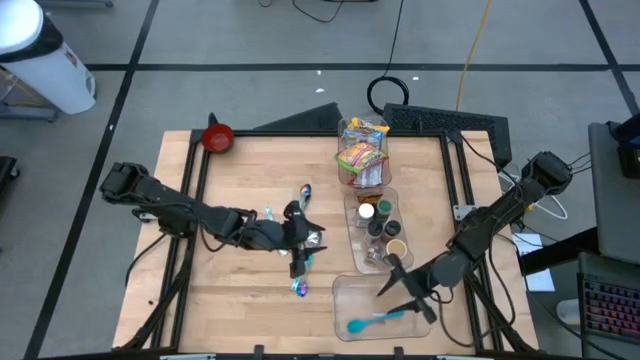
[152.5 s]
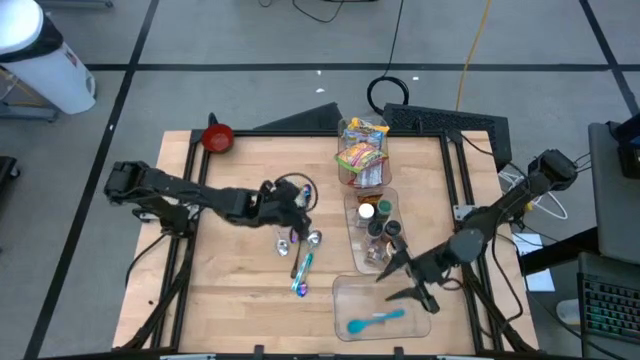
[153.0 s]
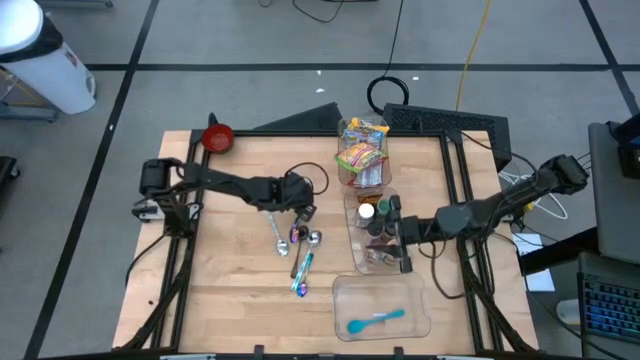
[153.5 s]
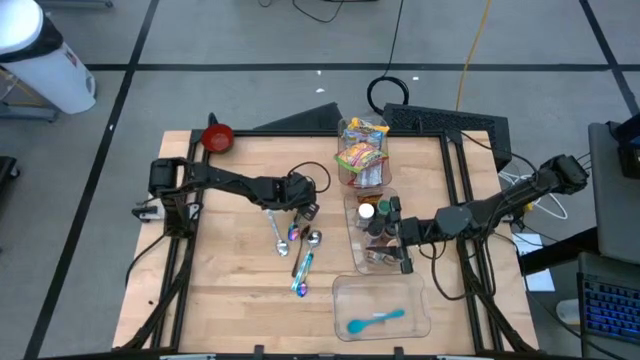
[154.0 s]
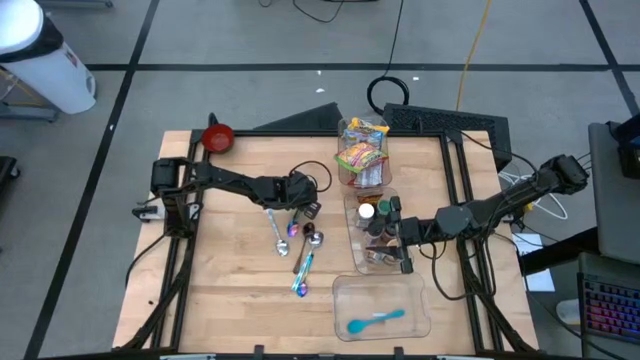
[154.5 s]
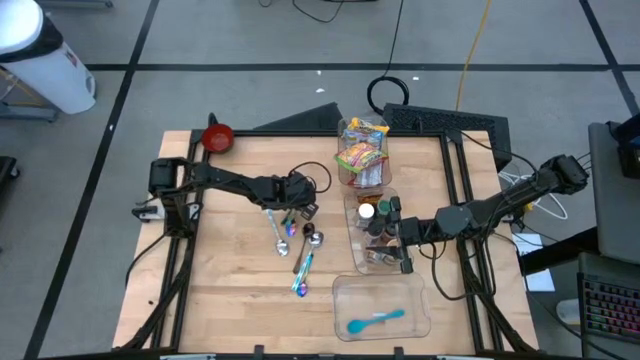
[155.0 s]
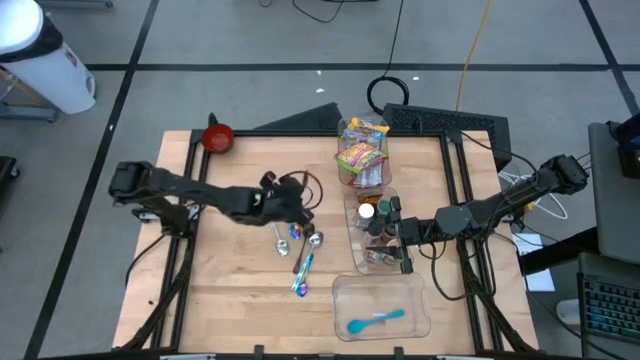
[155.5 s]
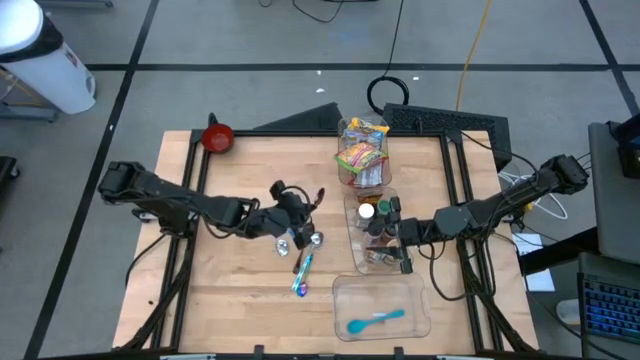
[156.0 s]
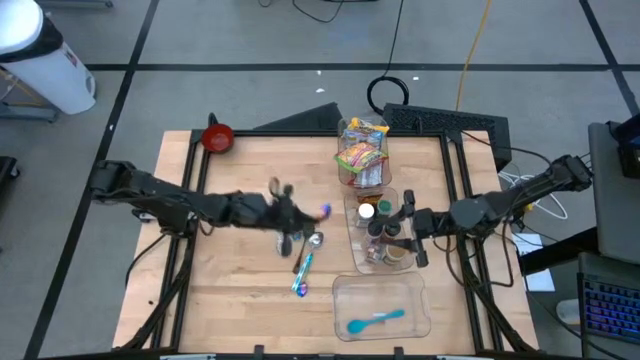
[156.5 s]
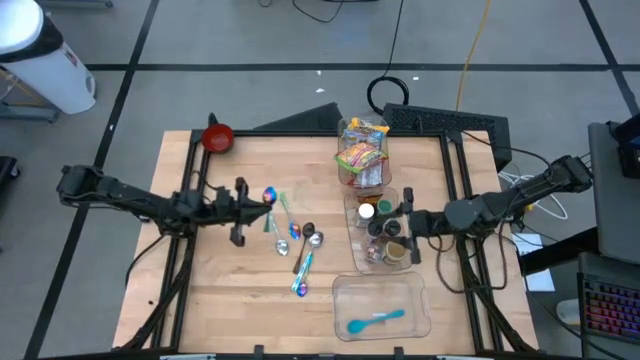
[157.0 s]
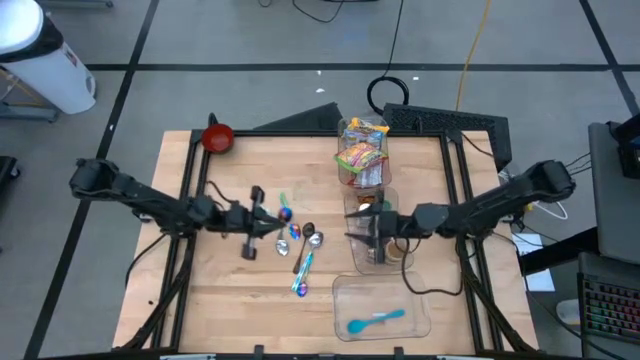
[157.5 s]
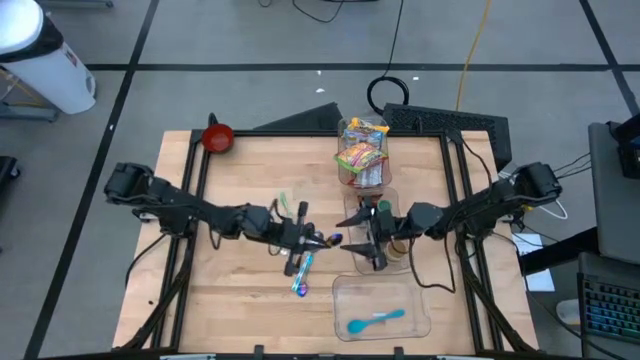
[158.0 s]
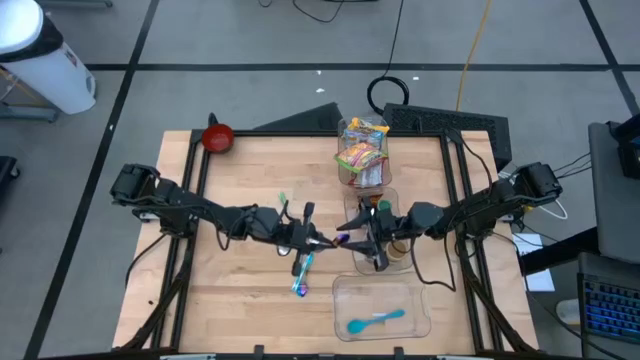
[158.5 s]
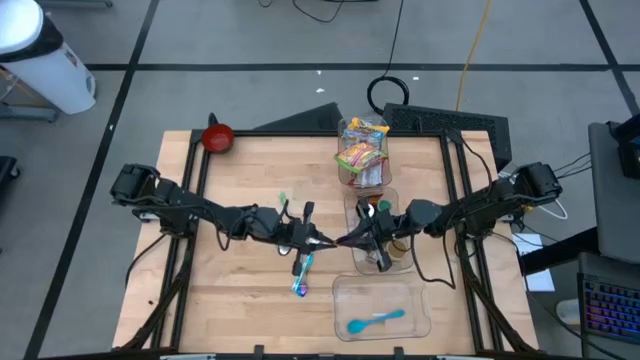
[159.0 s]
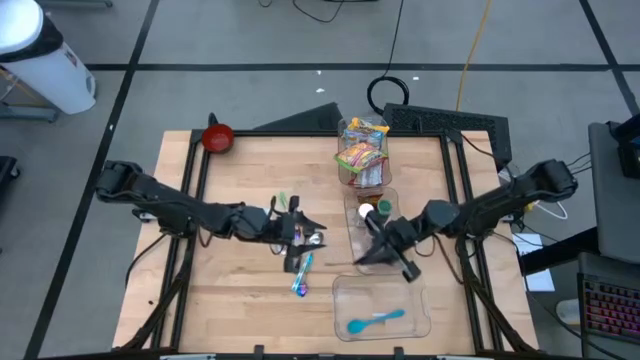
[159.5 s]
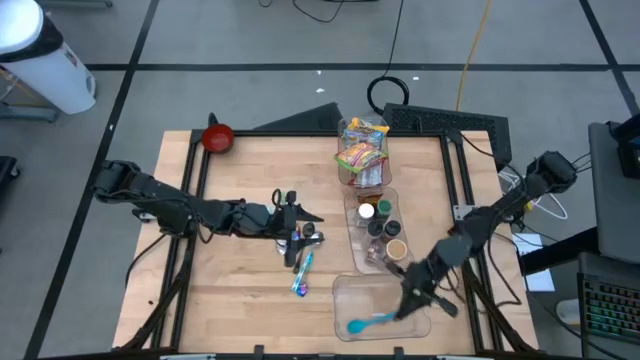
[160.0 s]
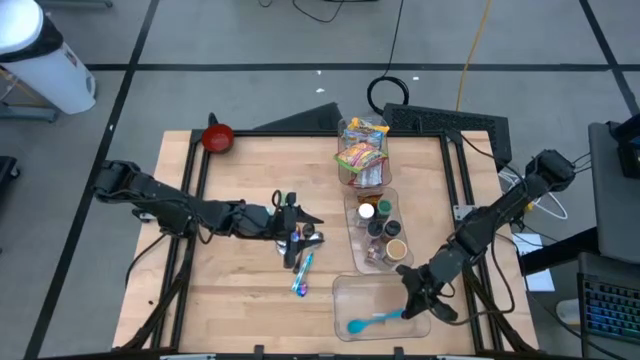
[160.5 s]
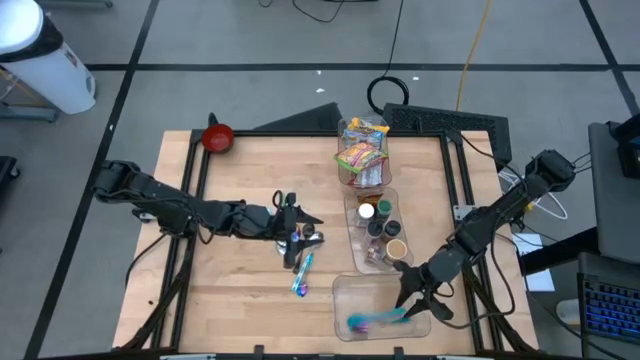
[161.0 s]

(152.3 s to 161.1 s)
Task: Pick & Place Food Item
Put the top left purple spoon into the bottom transparent bin

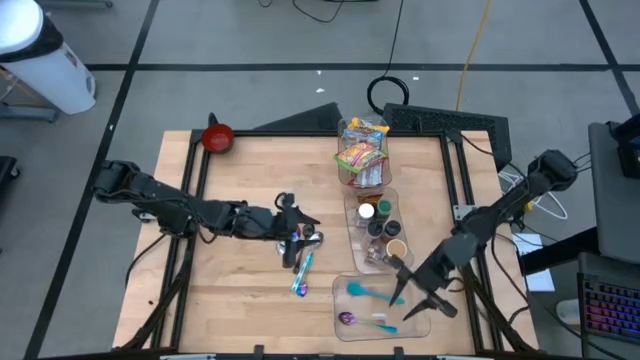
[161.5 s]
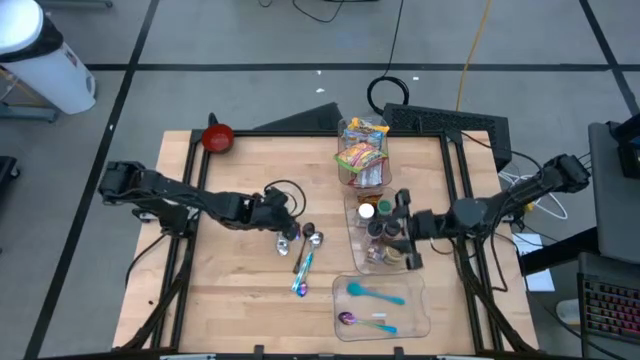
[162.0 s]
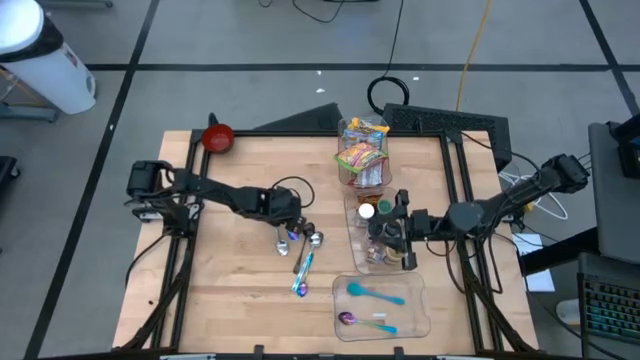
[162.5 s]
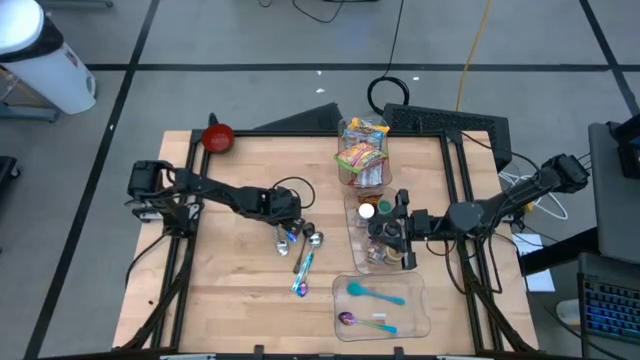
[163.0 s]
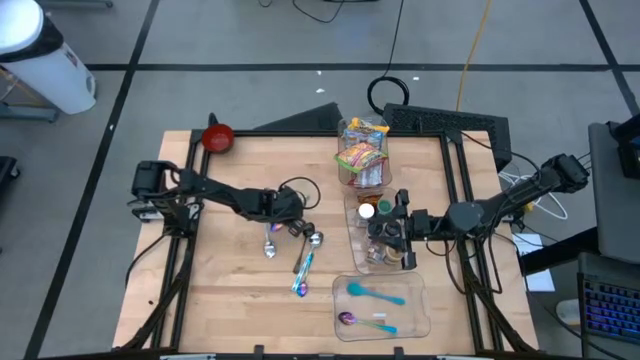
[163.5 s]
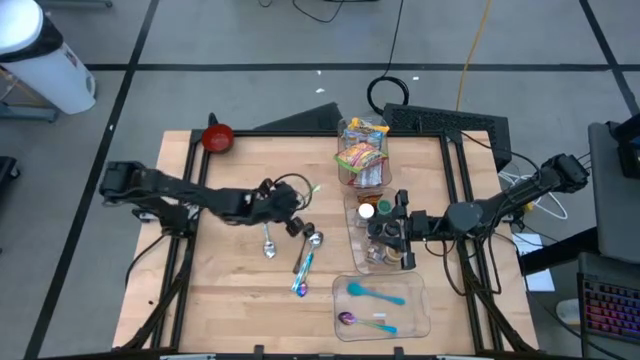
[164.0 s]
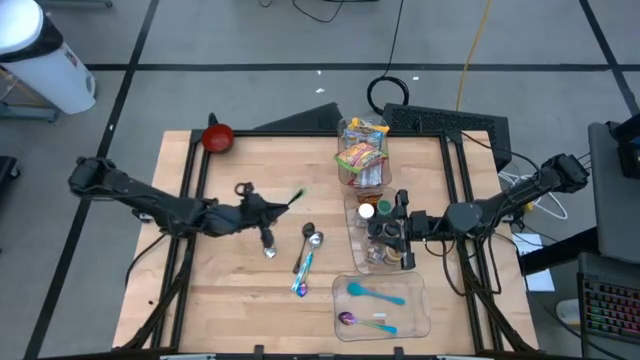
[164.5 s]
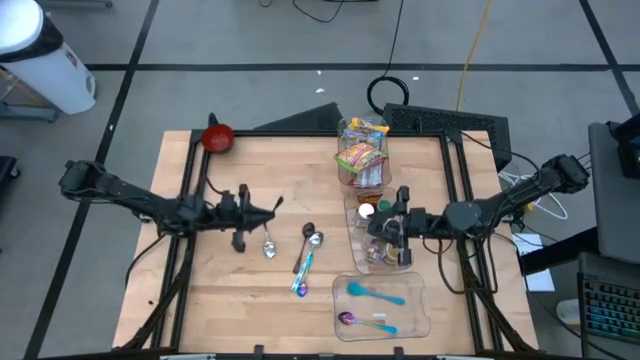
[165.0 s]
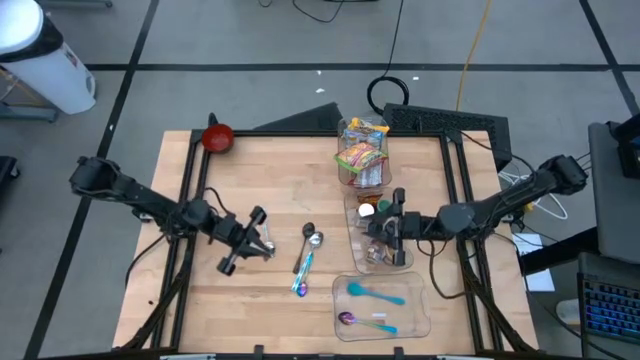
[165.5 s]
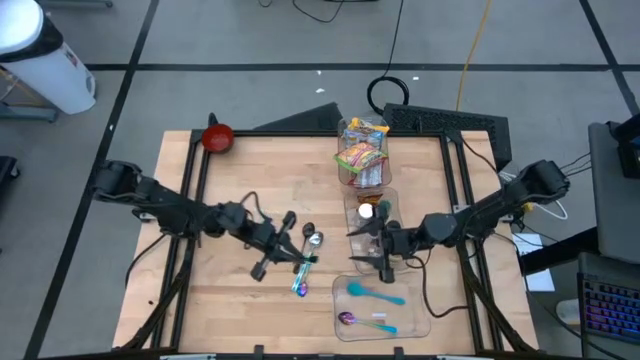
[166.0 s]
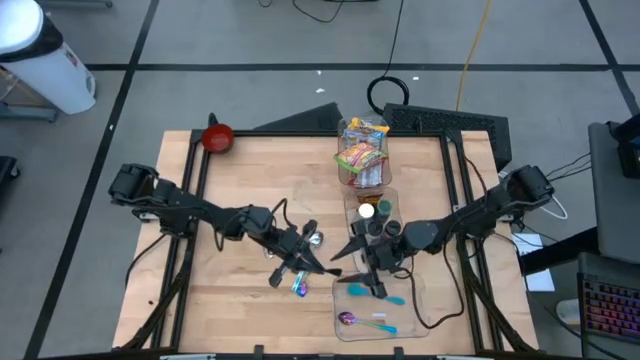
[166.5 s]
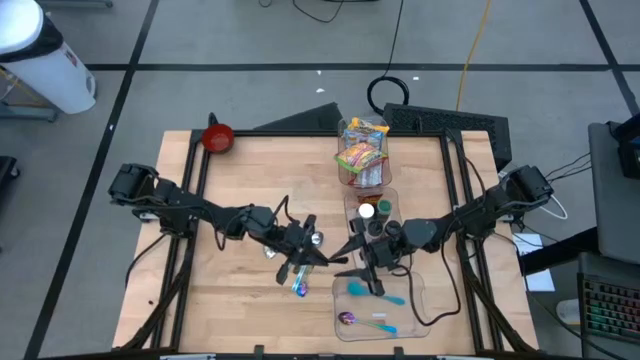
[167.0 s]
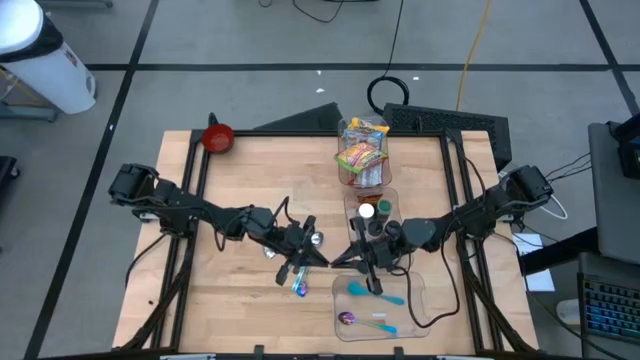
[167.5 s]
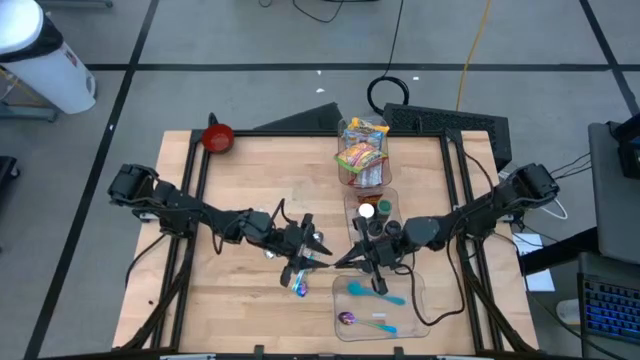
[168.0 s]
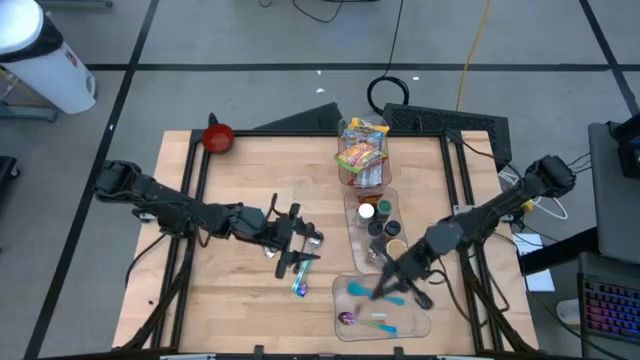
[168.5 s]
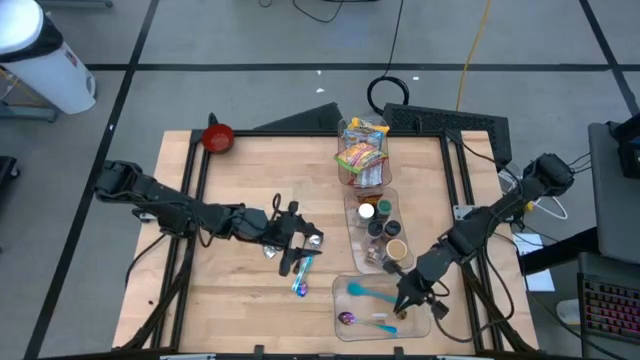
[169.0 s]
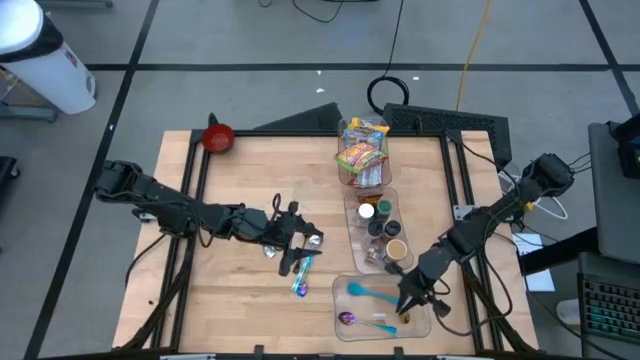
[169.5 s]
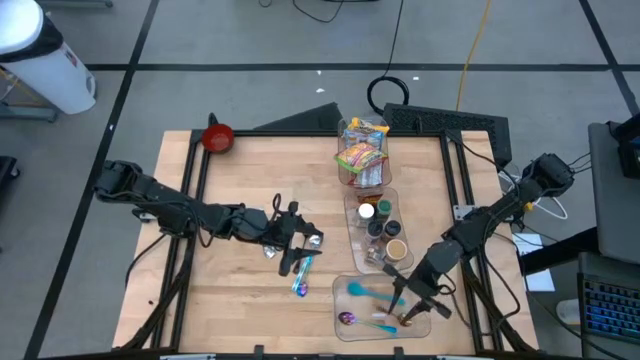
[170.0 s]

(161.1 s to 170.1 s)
Put the top purple spoon into the bottom transparent bin
